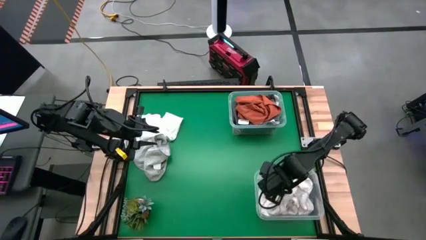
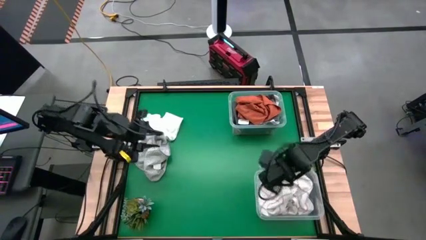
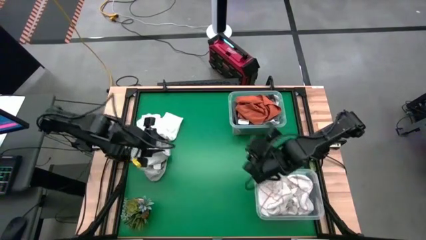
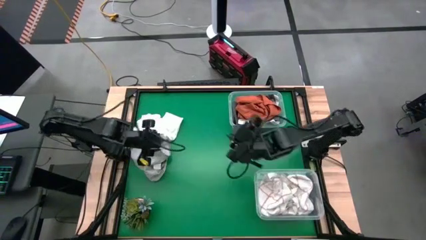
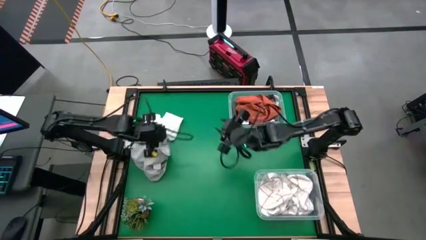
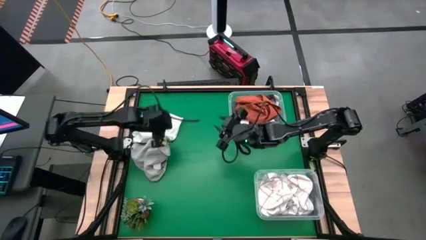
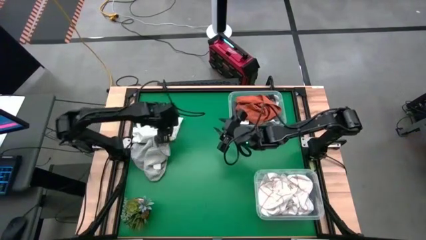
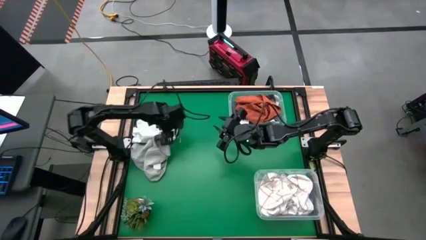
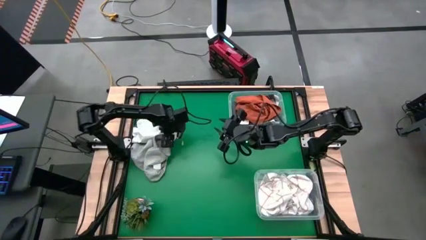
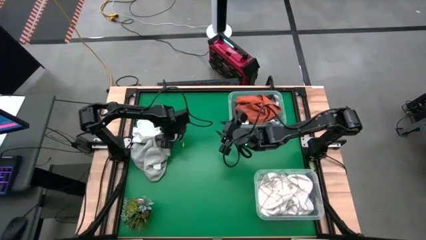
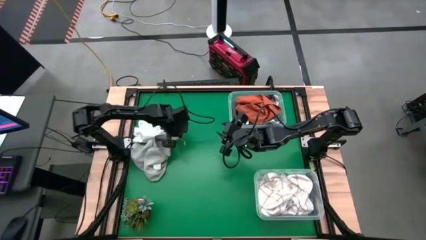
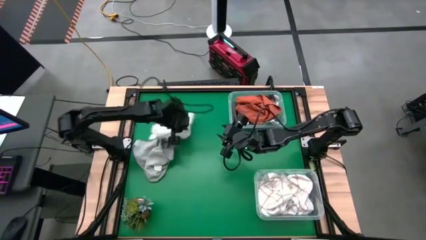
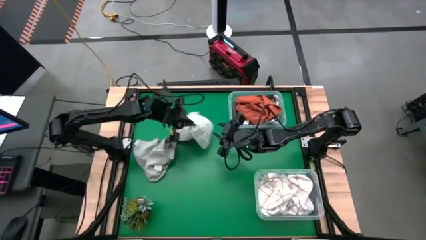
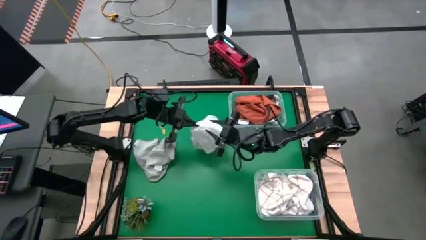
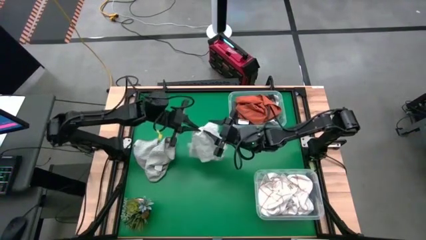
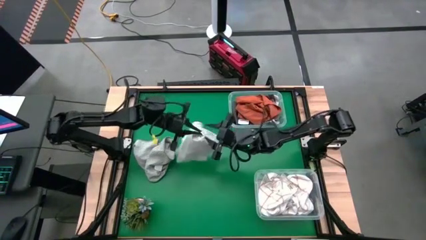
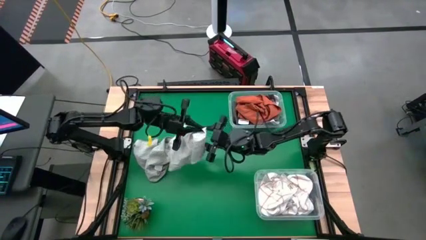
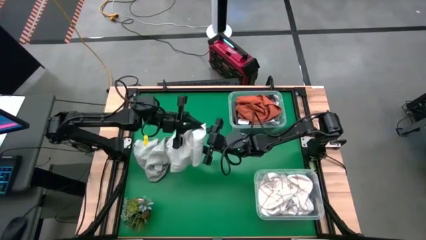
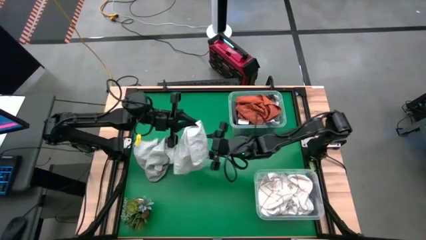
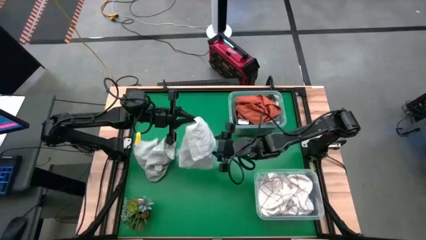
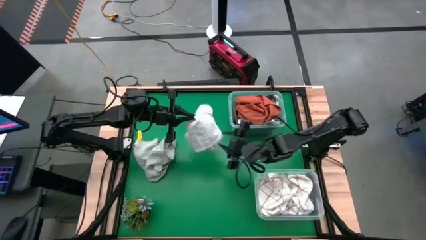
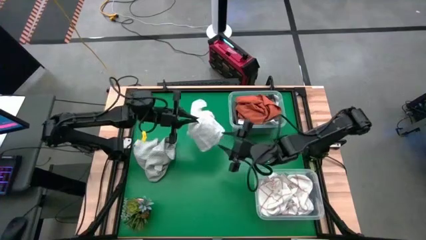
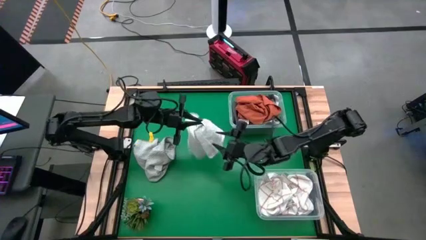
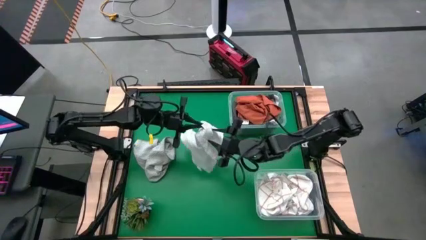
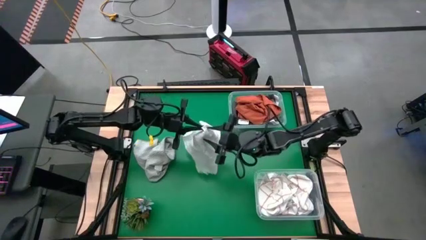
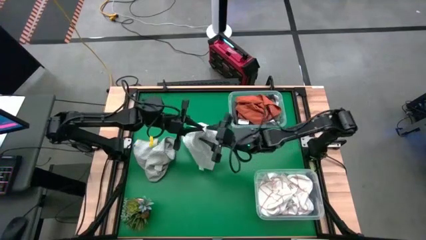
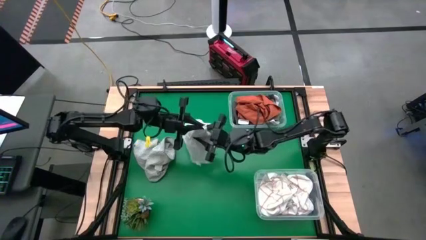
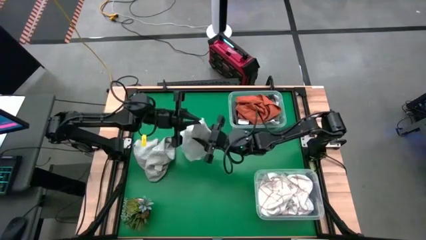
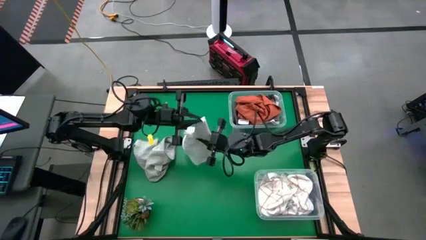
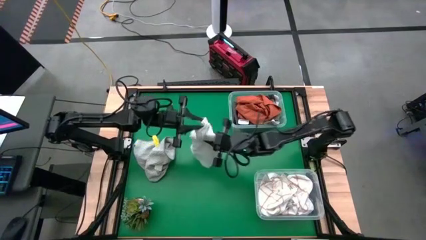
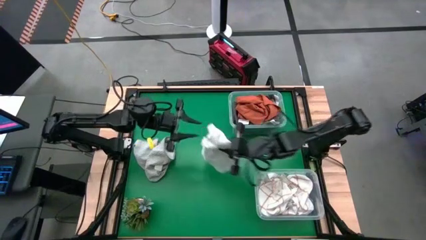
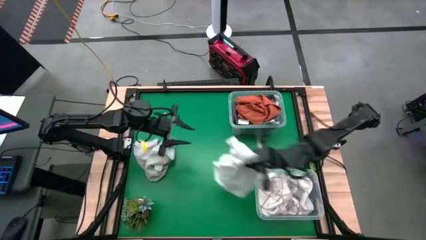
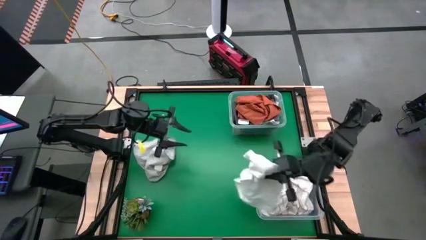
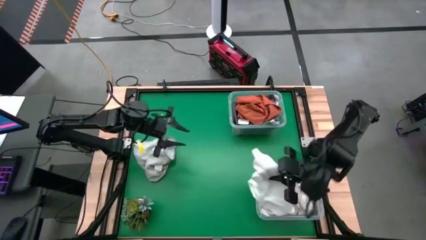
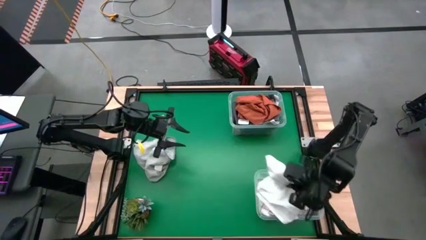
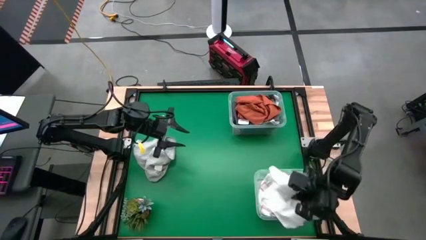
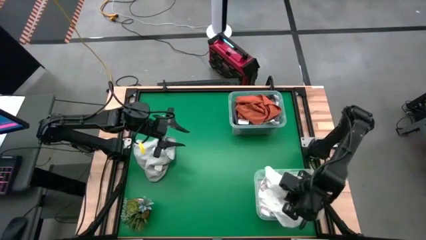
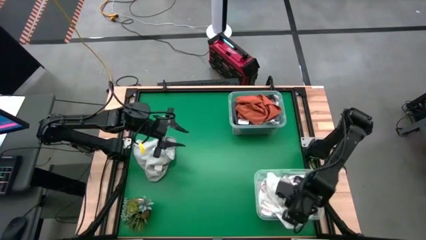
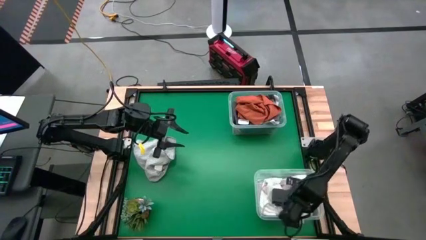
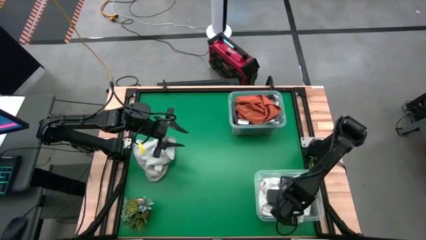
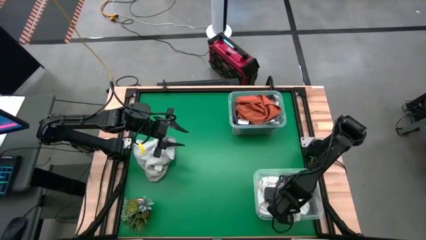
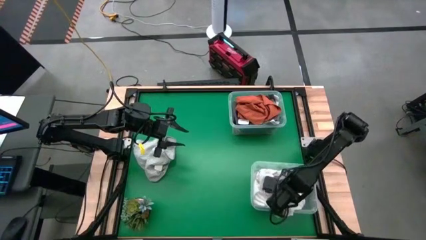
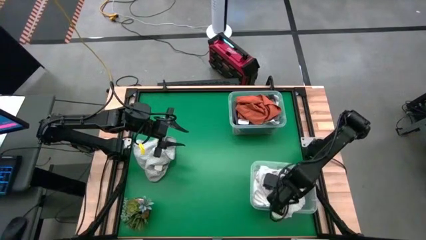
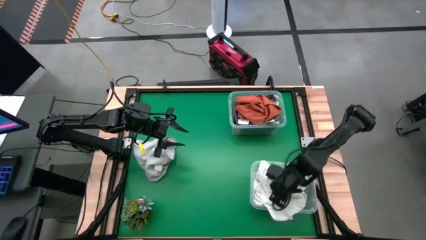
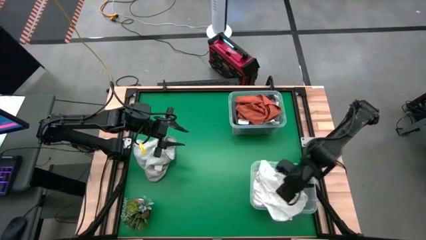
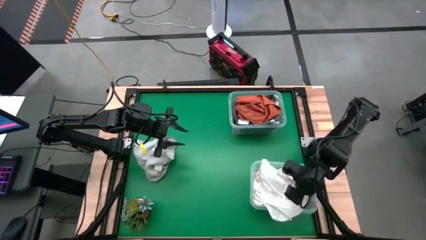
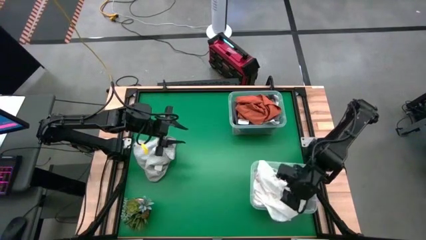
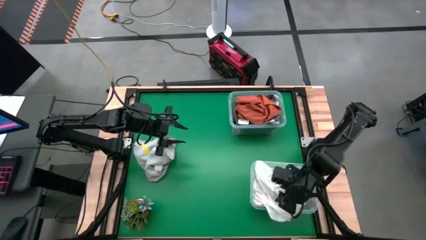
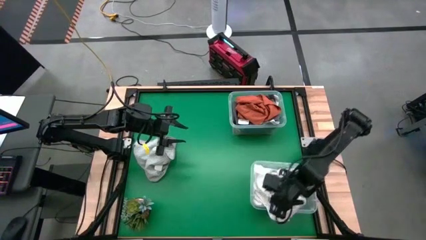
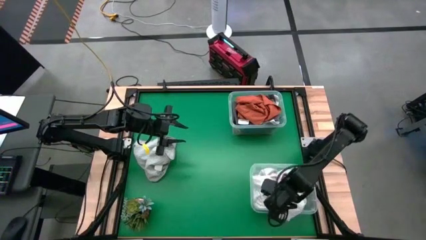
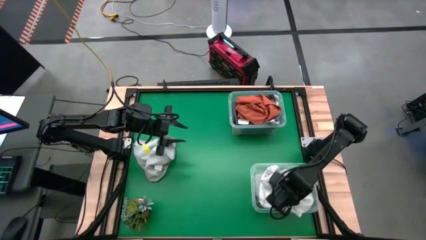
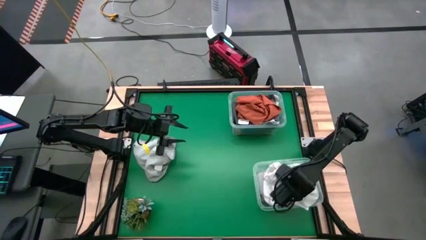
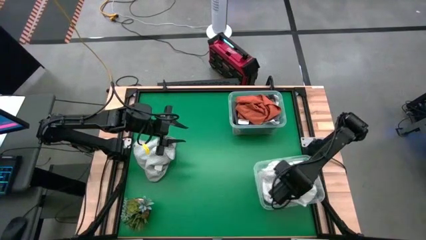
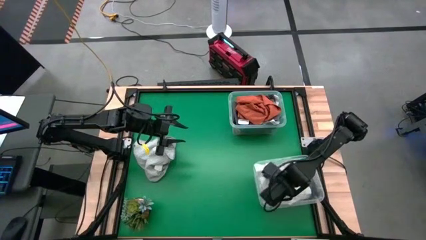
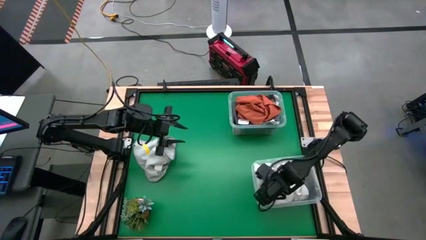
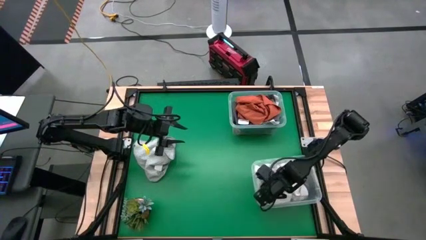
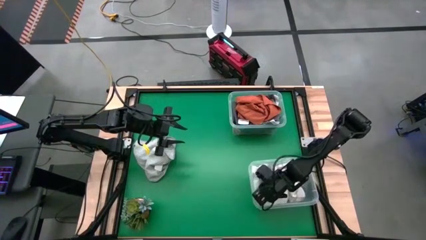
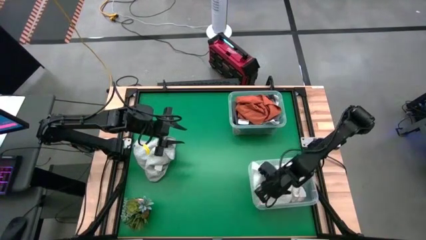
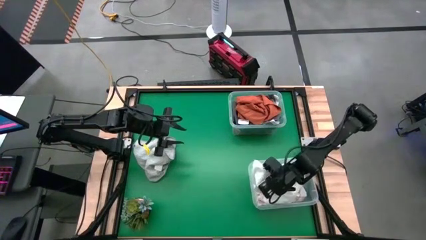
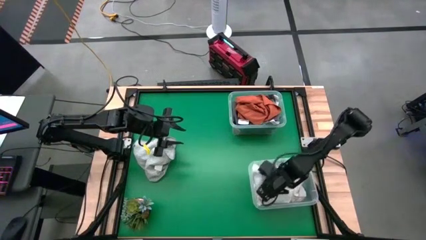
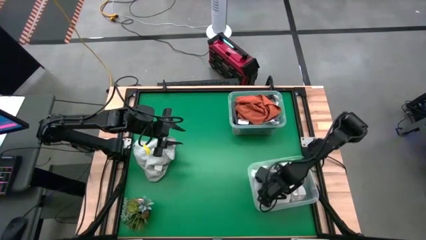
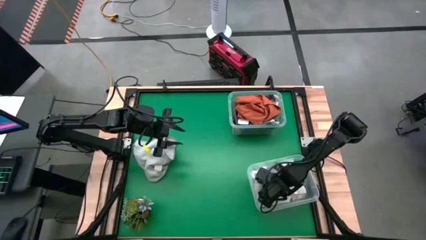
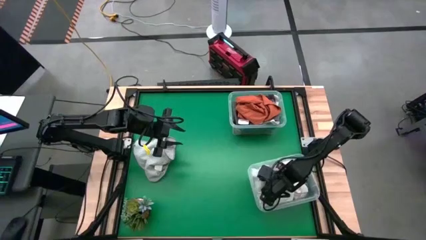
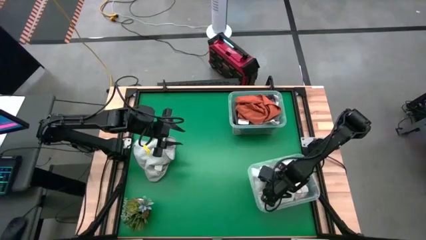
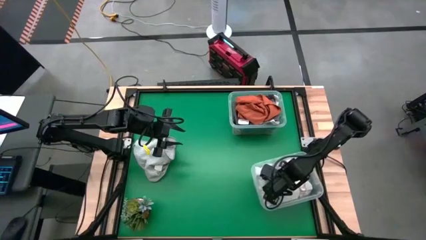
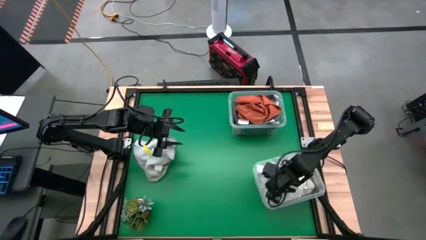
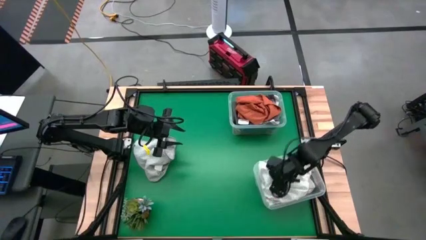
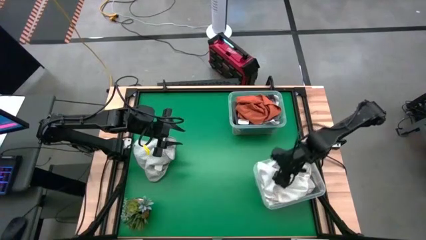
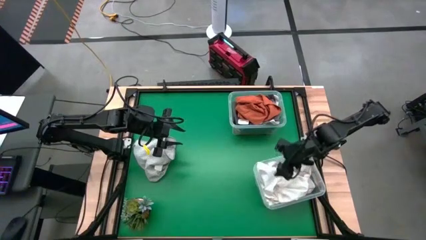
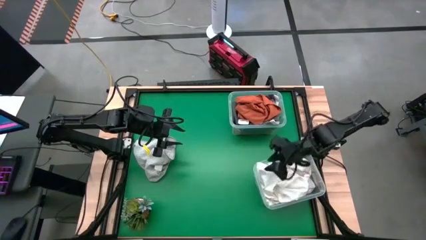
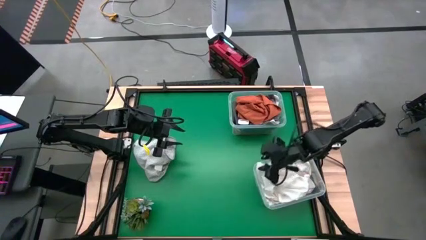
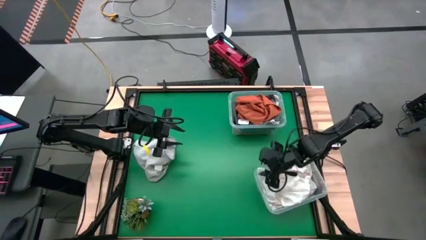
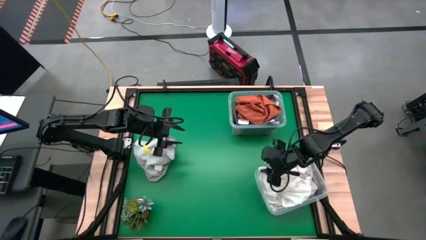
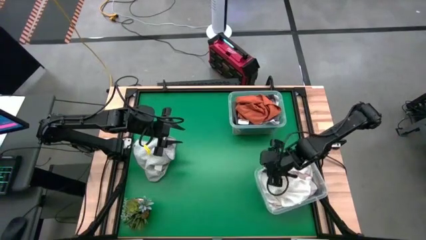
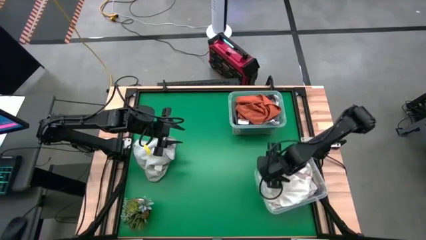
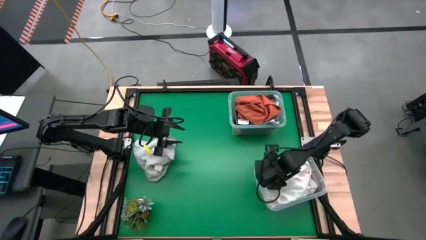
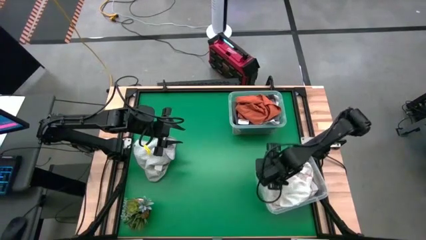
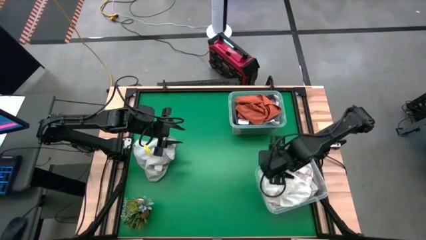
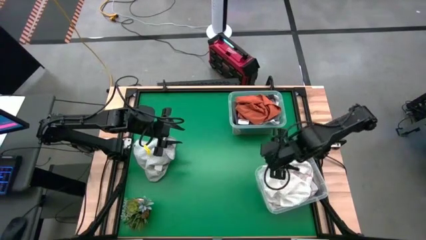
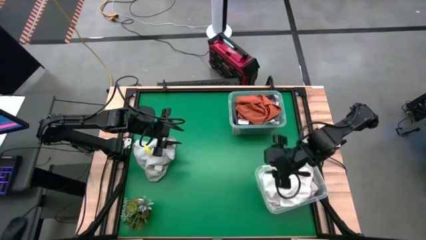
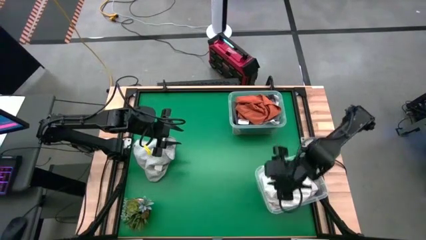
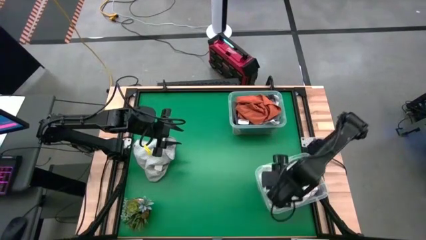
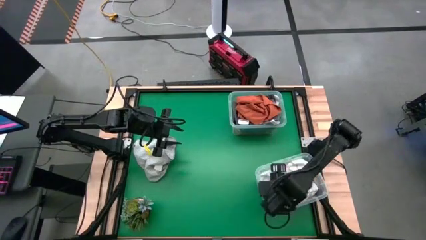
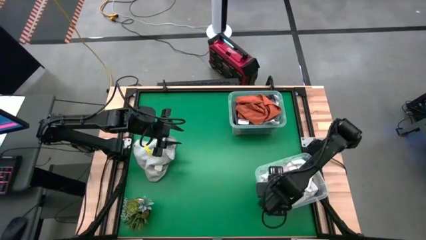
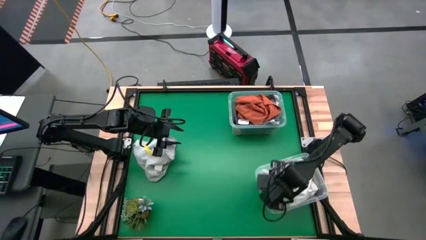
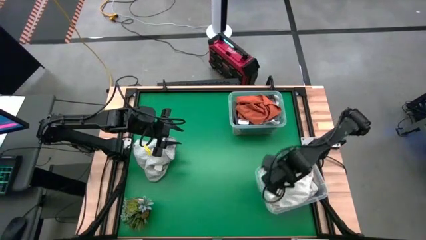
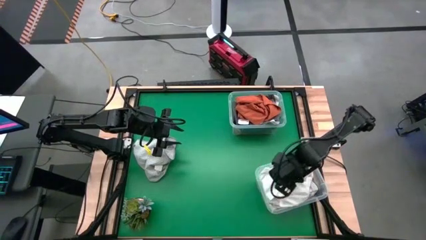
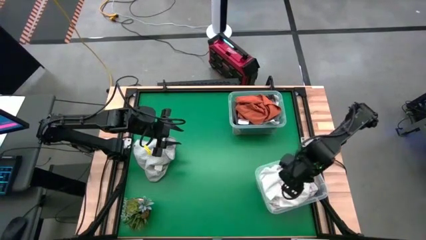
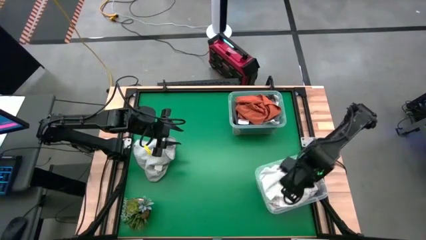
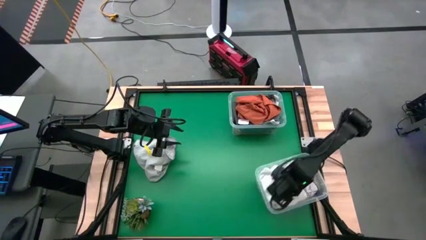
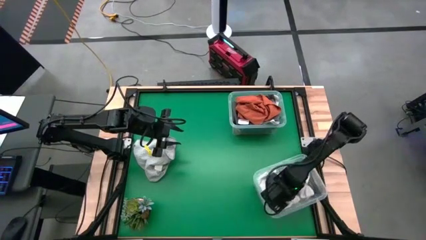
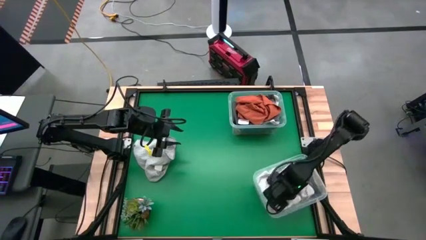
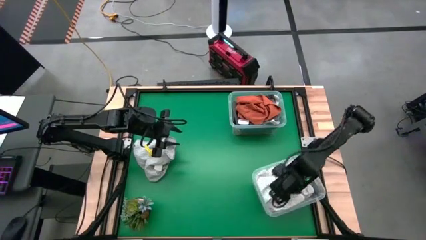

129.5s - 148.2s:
Task: Sort towels by color in basket
Put the white towel into the bottom transparent bin
